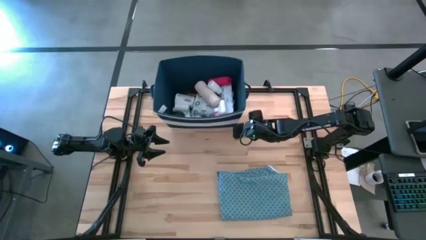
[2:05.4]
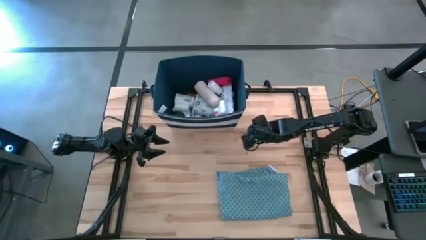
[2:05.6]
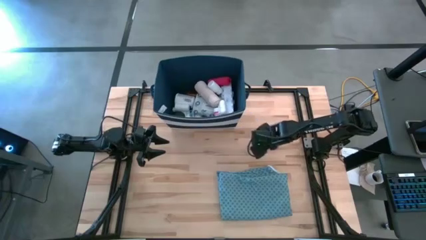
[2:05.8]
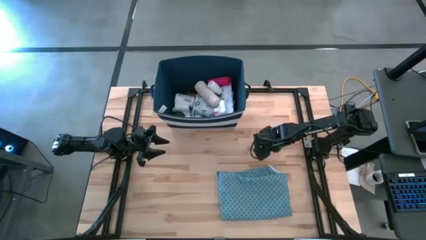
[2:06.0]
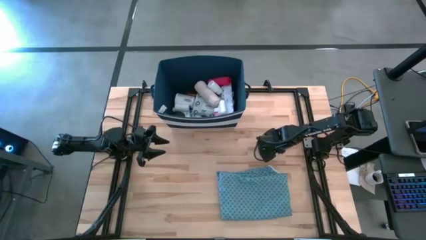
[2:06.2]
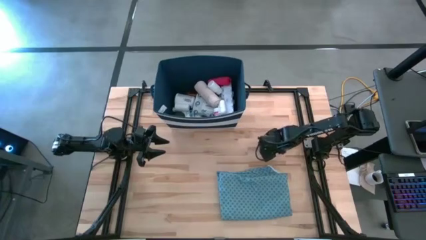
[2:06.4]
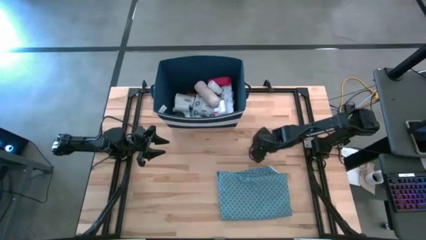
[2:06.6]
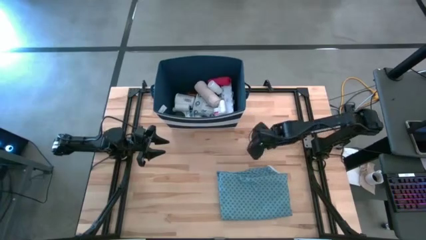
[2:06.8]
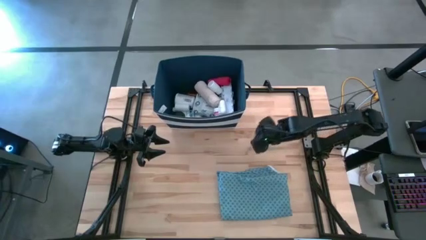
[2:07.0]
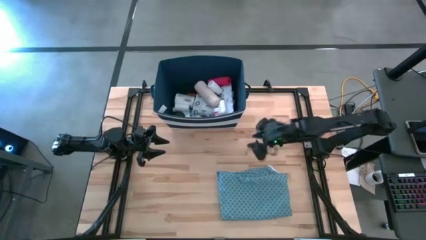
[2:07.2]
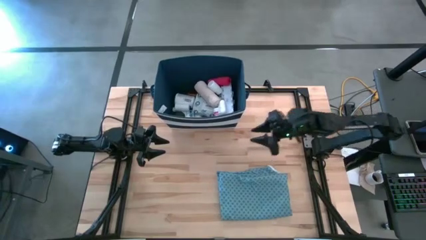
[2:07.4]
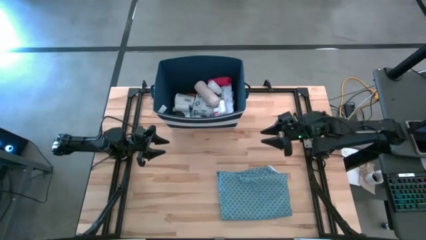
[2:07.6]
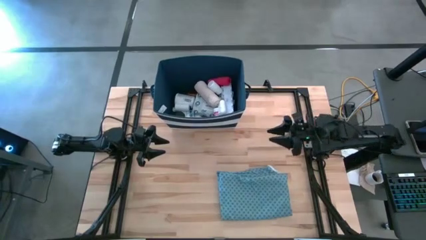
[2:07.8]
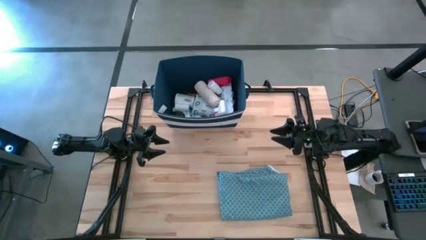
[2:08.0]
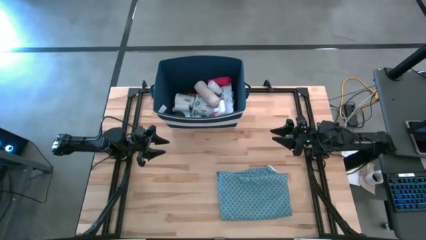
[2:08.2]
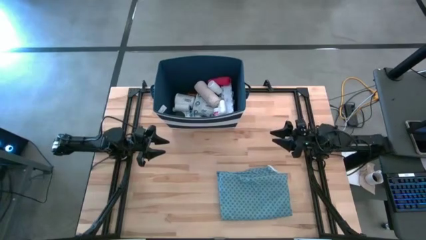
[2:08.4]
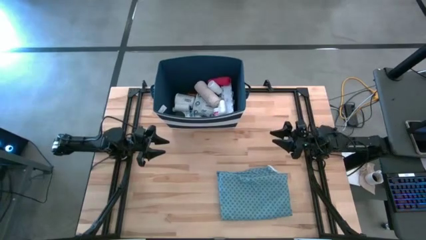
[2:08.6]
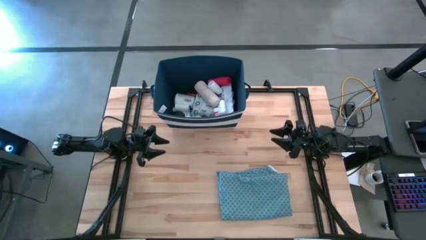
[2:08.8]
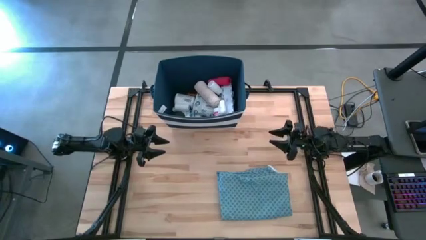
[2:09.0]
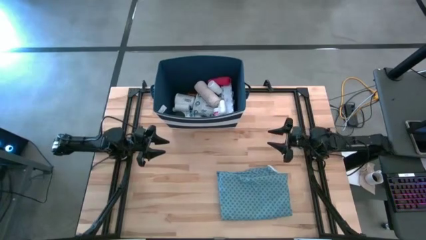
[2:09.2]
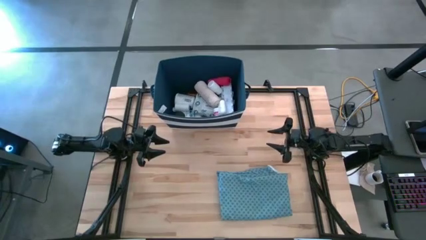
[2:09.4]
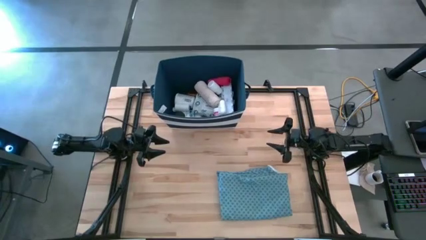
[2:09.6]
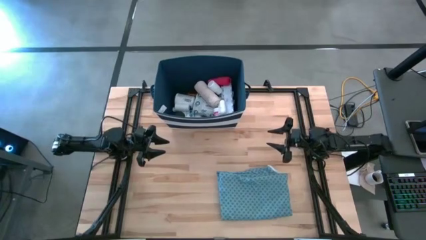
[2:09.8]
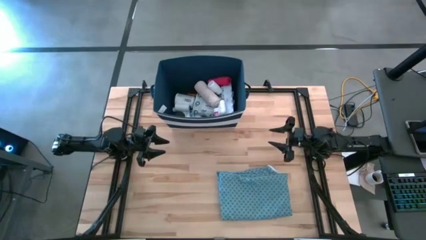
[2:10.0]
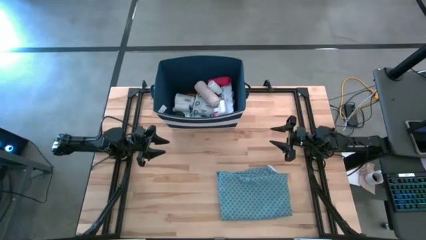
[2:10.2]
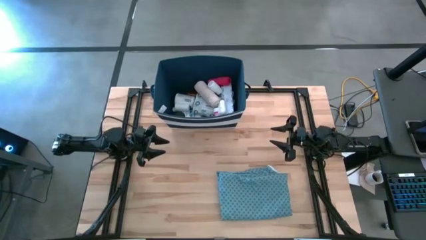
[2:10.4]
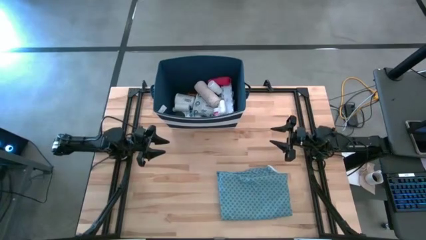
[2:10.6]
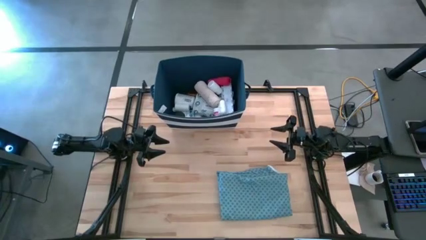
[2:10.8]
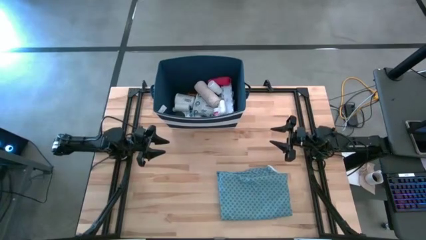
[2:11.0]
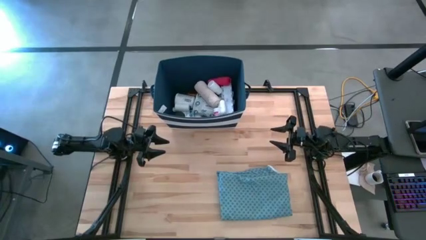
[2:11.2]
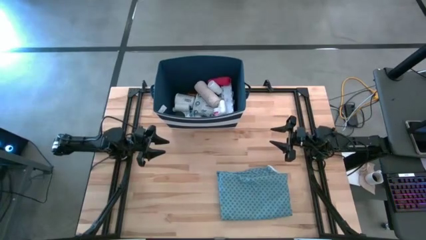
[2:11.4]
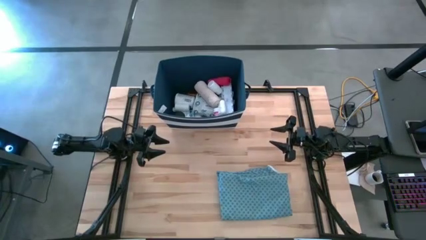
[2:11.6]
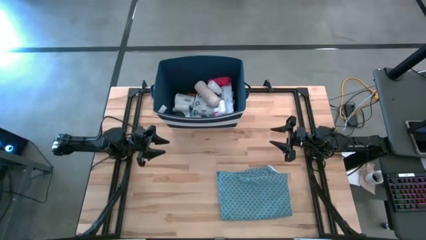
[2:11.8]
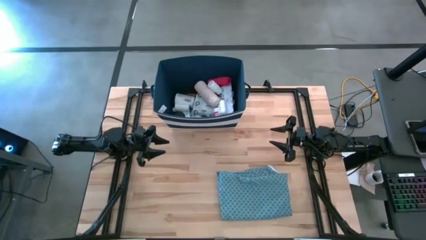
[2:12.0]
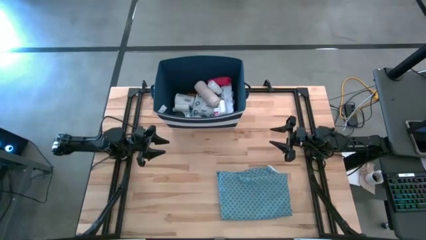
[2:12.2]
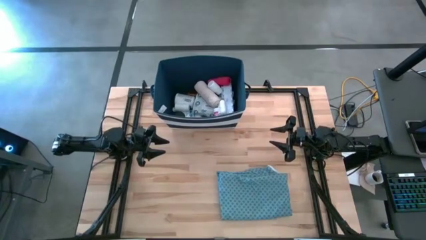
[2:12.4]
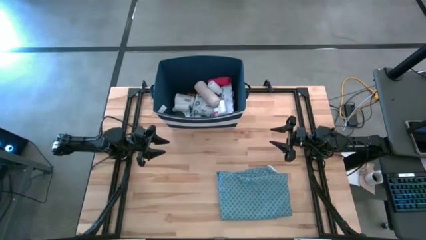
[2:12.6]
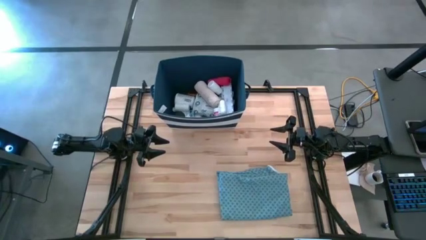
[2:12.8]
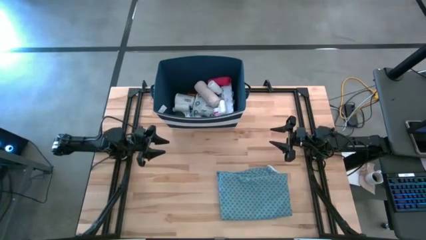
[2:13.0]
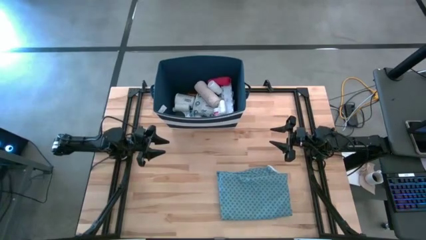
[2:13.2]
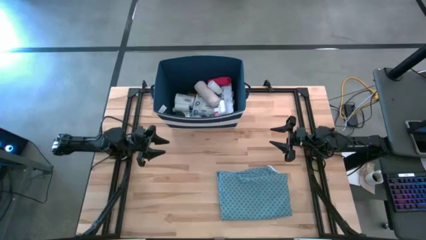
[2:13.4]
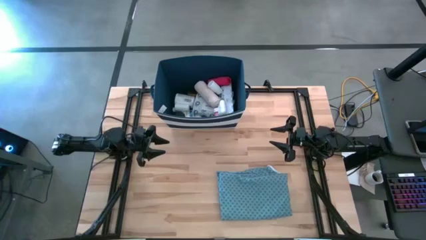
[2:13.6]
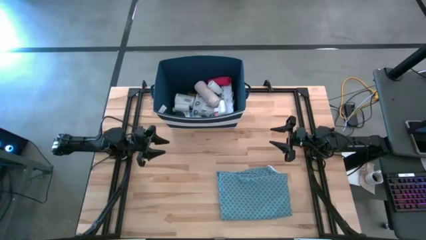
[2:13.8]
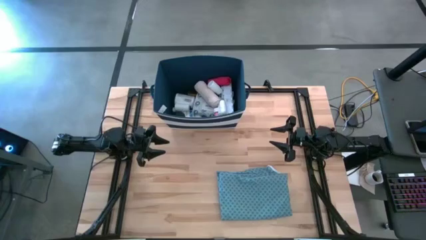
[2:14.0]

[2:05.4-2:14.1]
Task: Pick & place medical supplies in basket/bin
Return to Home Position

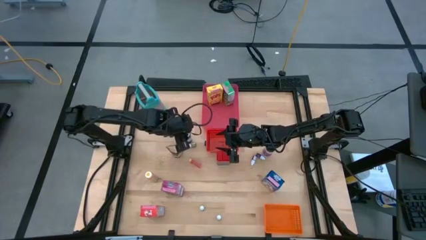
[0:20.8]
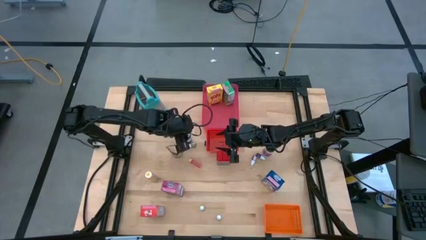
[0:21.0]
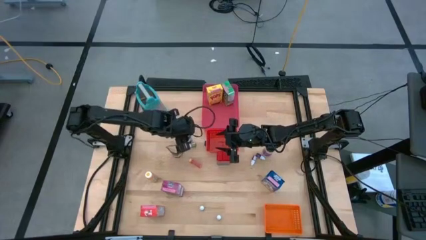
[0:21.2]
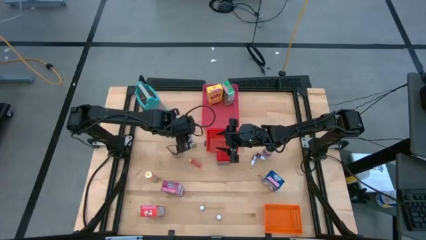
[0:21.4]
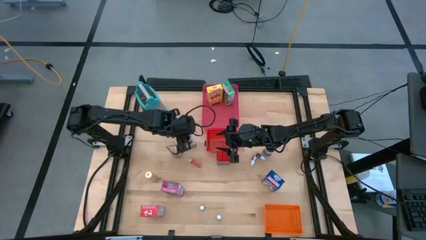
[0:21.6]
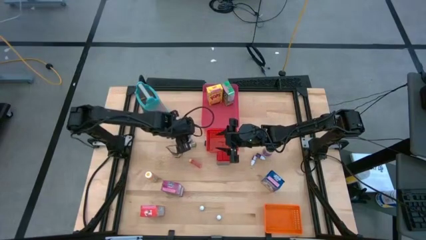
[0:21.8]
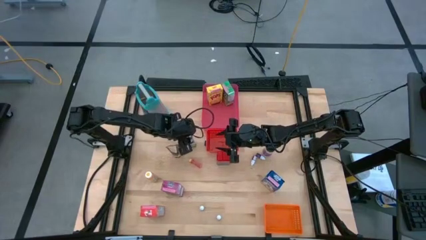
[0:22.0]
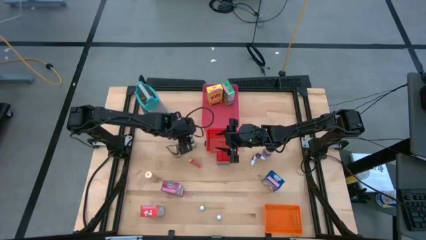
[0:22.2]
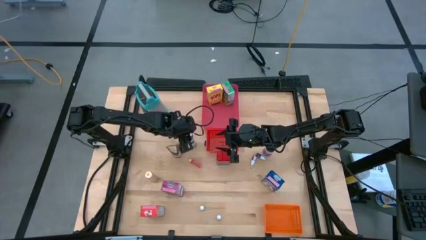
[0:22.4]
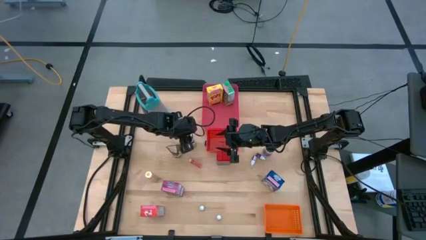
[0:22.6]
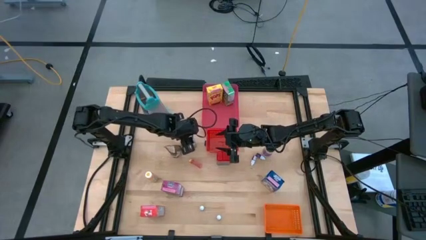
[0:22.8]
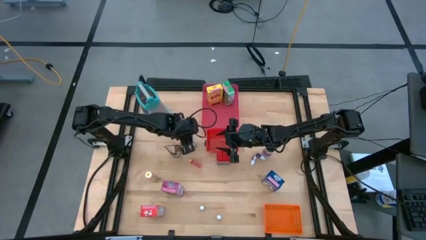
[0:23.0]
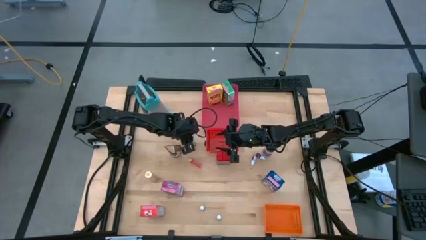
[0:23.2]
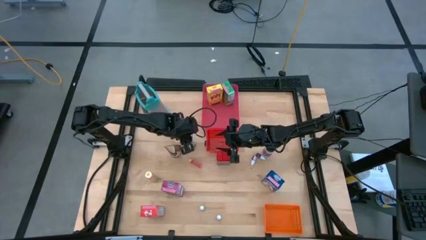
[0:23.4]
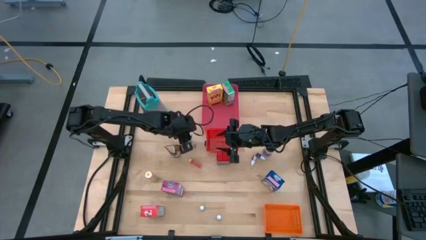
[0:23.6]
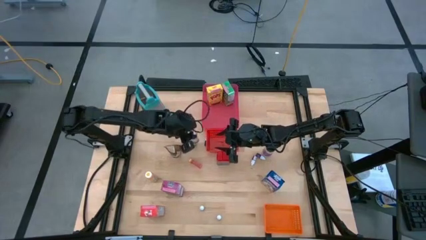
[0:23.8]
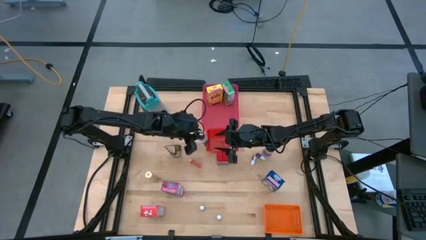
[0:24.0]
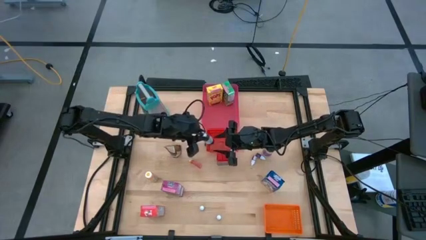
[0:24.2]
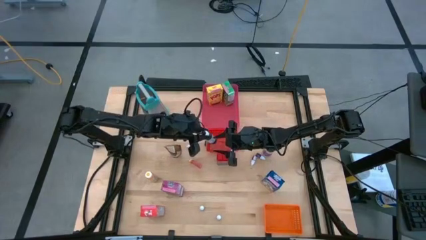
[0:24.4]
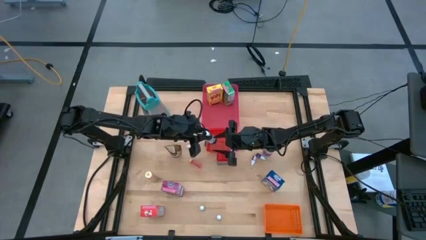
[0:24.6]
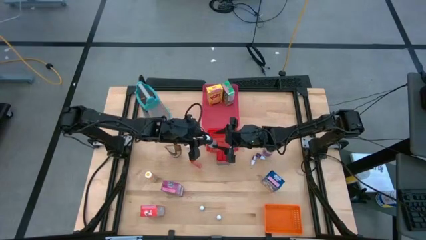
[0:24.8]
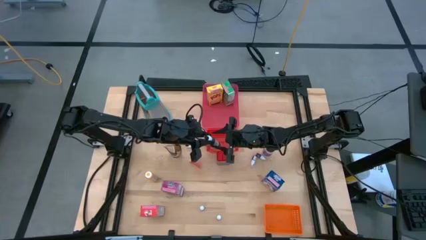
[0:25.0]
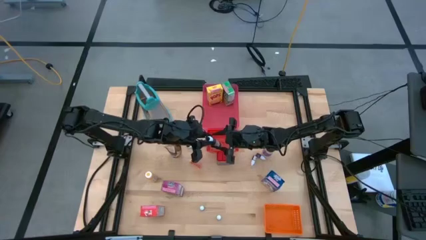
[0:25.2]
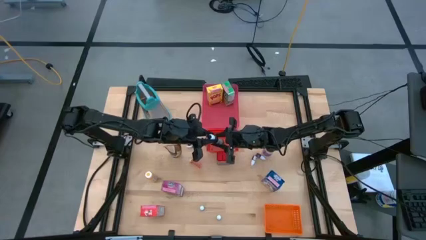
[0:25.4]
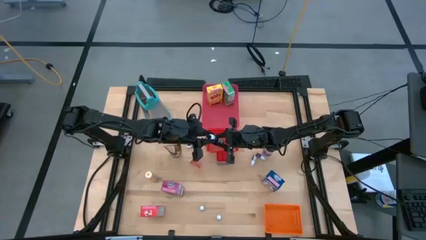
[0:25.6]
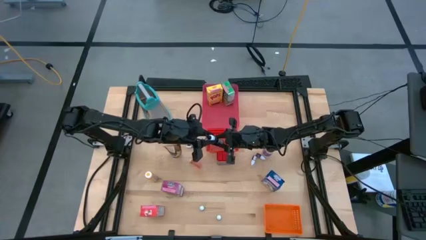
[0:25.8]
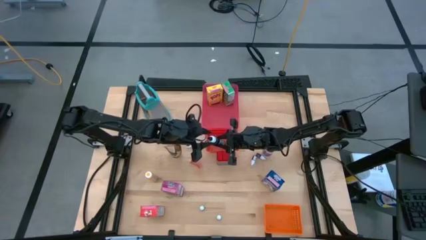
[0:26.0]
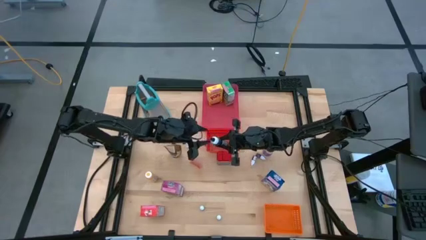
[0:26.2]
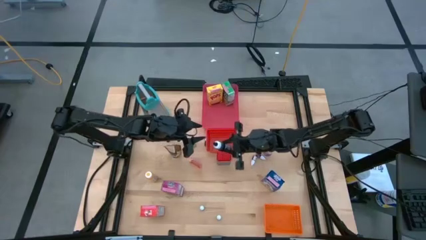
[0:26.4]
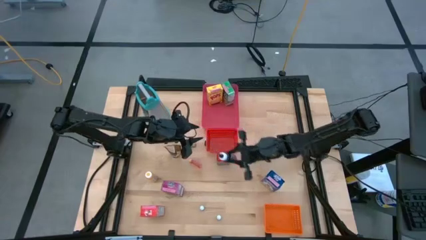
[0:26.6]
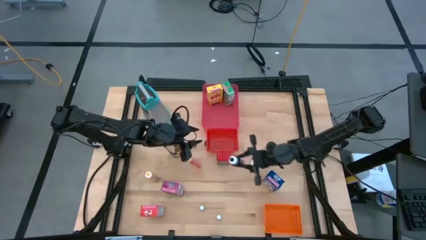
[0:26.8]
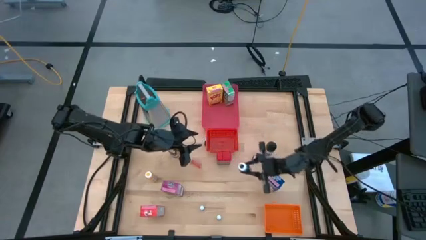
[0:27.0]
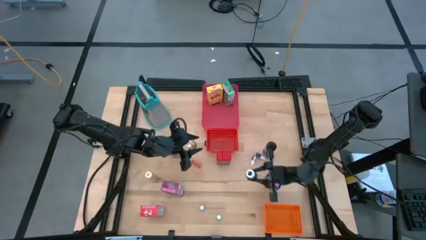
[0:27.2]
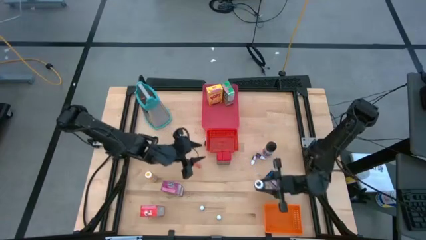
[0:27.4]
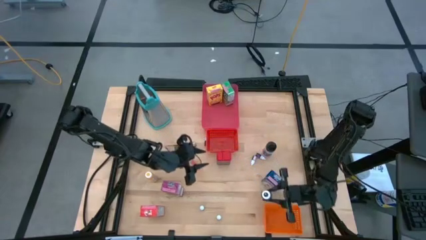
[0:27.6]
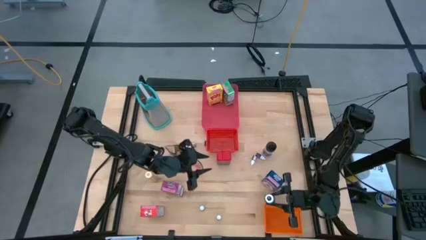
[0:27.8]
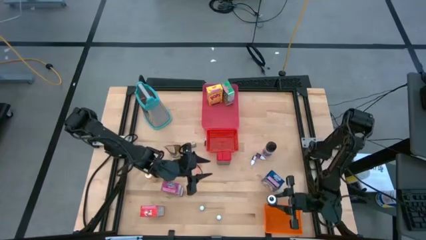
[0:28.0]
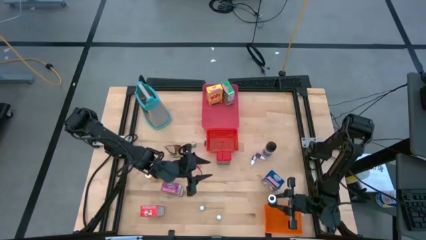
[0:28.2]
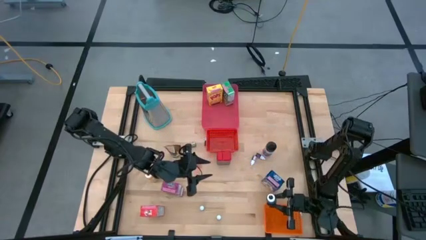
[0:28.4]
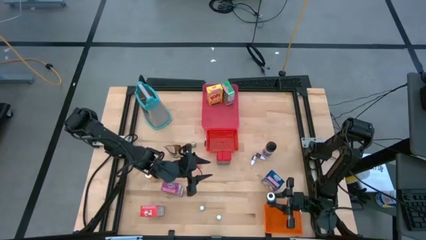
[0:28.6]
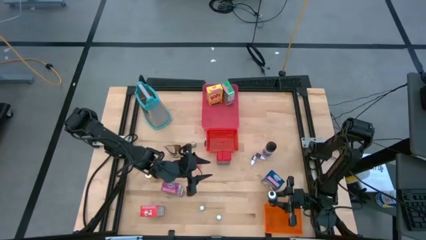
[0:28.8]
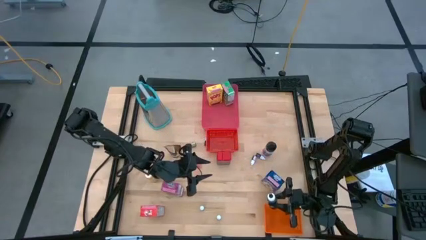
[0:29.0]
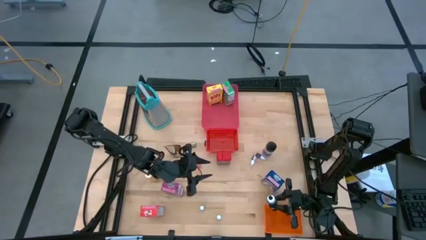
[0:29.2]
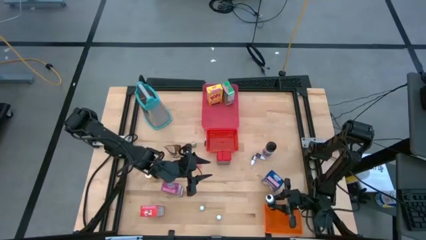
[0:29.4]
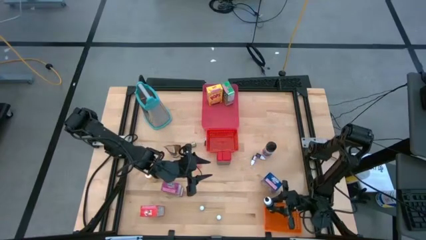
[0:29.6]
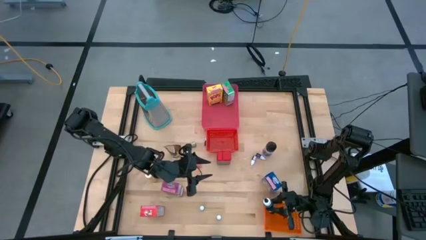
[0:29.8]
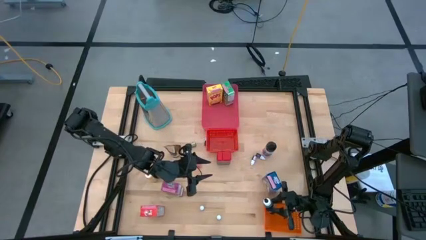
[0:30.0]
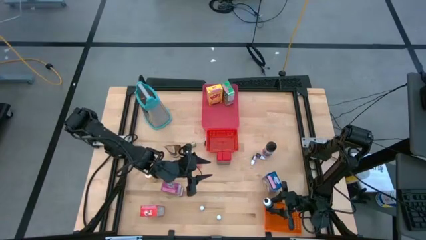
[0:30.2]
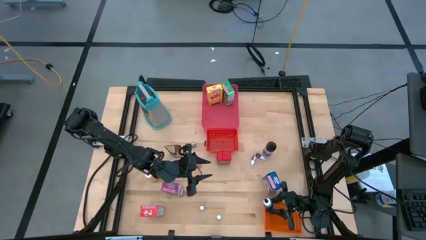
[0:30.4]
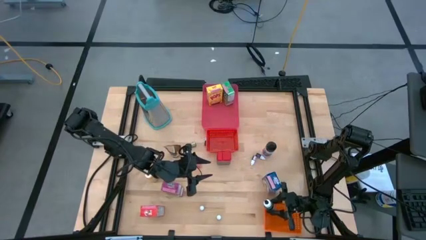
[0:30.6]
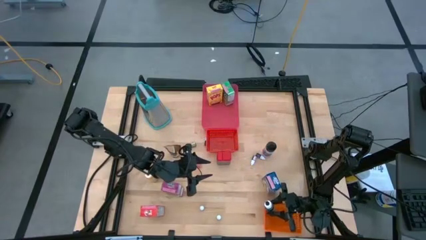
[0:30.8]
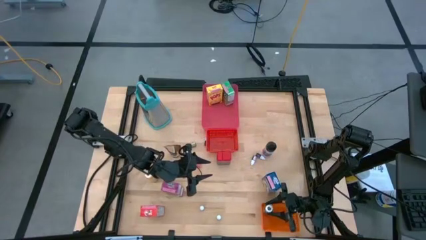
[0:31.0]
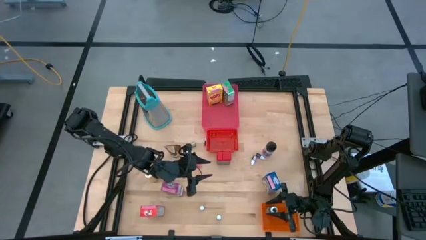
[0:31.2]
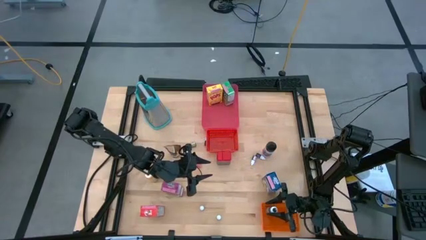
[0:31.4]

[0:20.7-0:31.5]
Task: Pick & Place Kitchen Items
Put the black food coloring bottle into the orange bin
